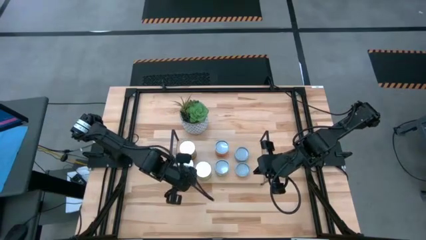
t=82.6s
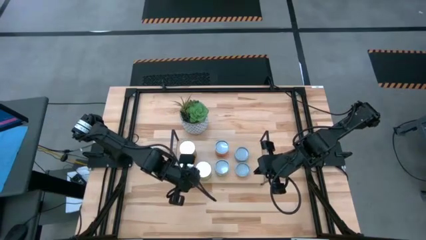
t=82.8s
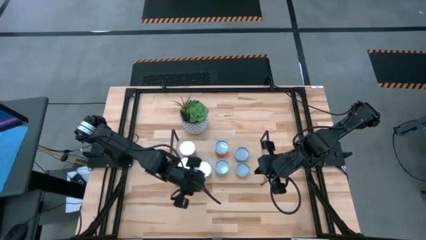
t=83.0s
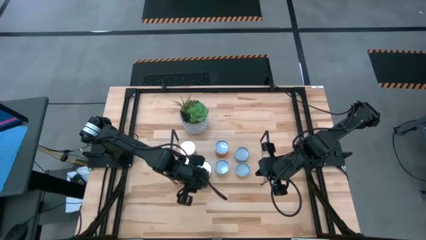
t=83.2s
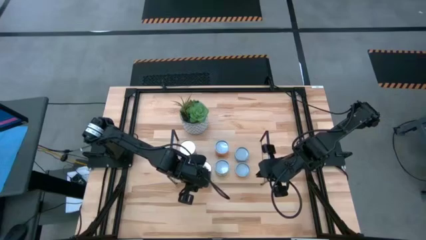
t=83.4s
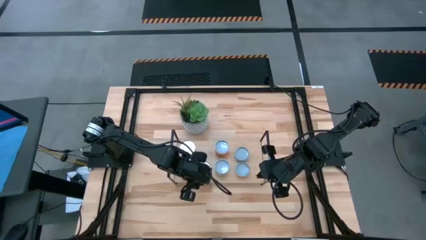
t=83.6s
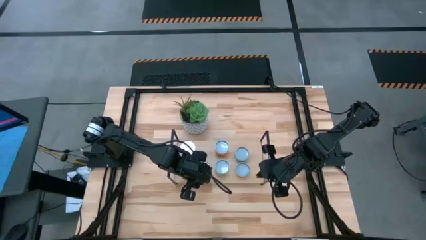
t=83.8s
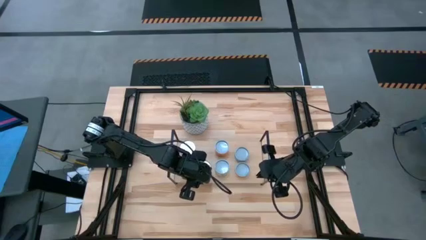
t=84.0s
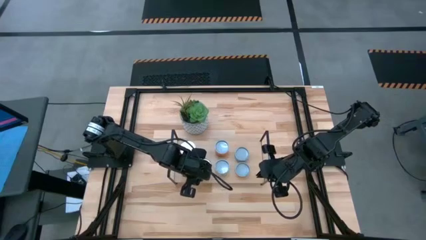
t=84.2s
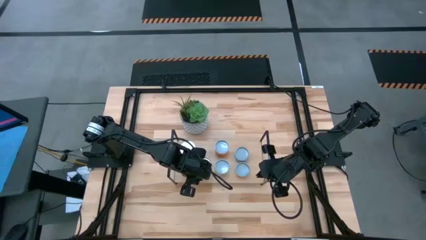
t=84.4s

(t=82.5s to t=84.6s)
Task: Pick and place cans onto a shelf
Adjust the canned pears on the shelf

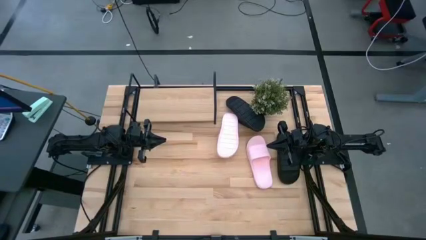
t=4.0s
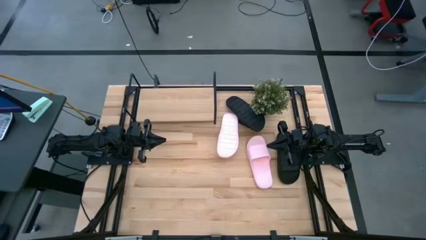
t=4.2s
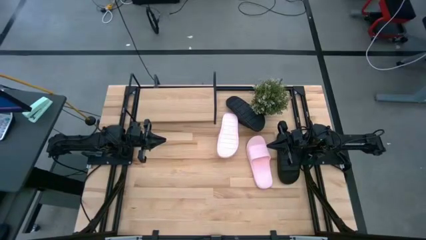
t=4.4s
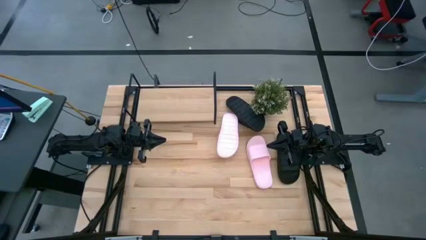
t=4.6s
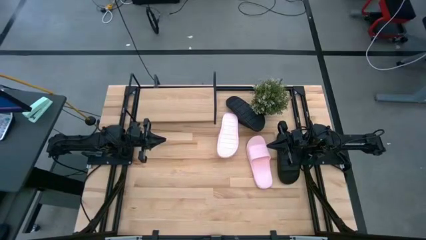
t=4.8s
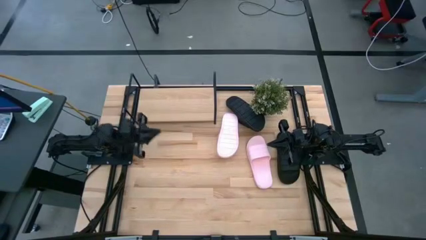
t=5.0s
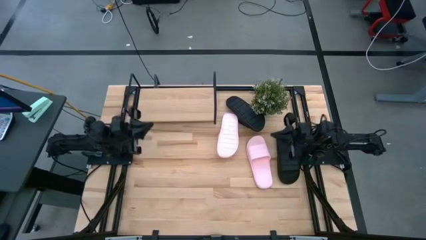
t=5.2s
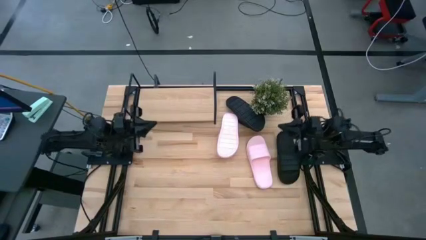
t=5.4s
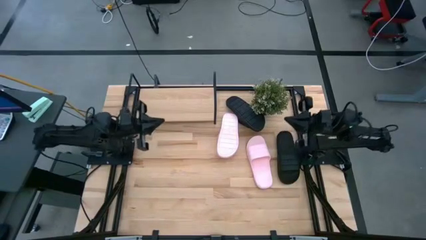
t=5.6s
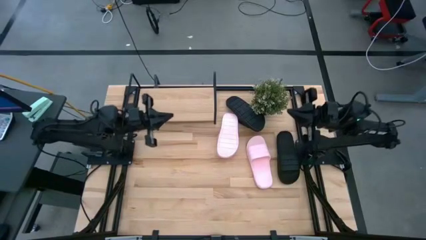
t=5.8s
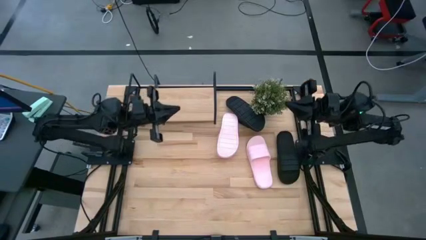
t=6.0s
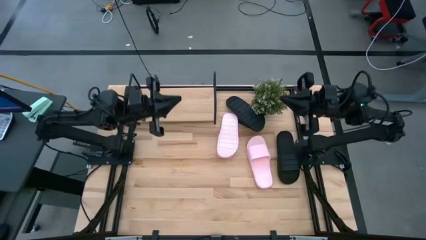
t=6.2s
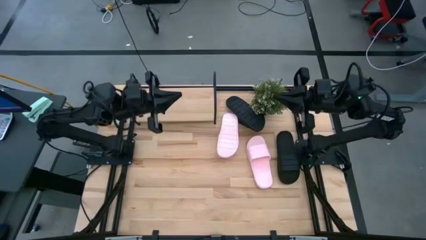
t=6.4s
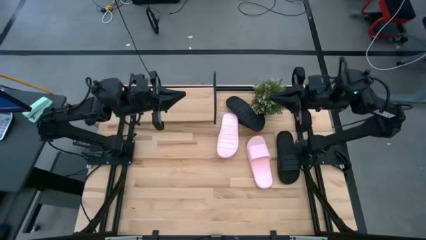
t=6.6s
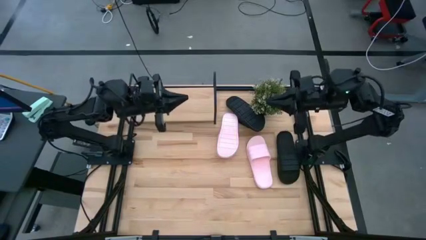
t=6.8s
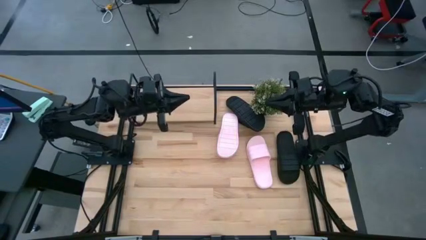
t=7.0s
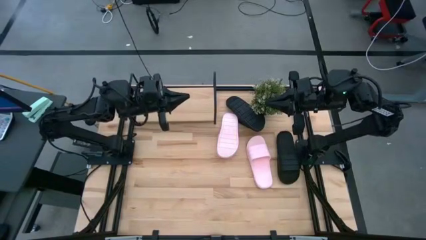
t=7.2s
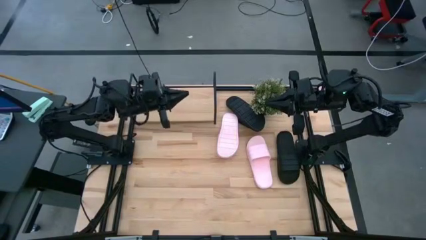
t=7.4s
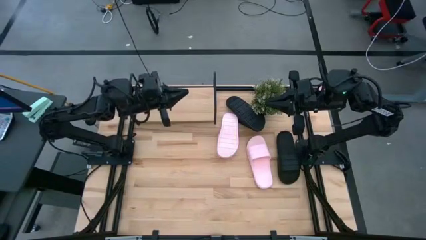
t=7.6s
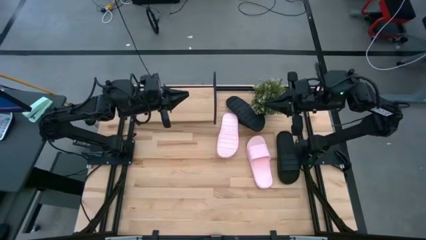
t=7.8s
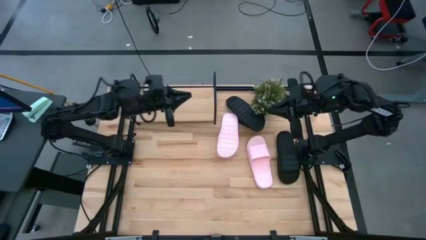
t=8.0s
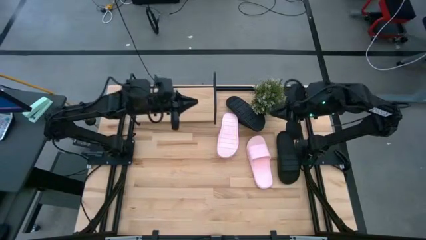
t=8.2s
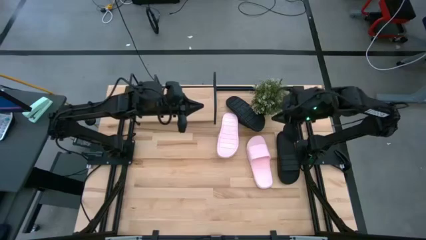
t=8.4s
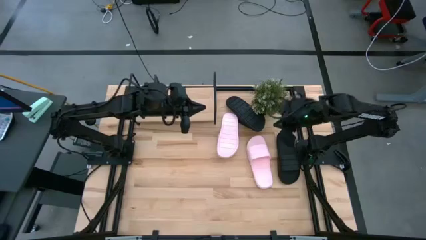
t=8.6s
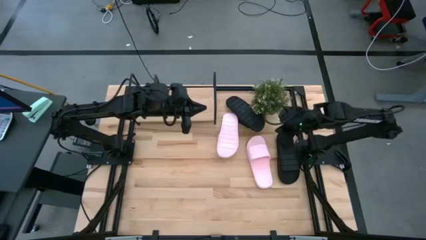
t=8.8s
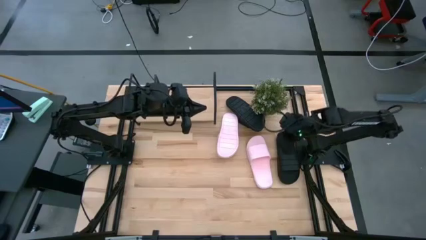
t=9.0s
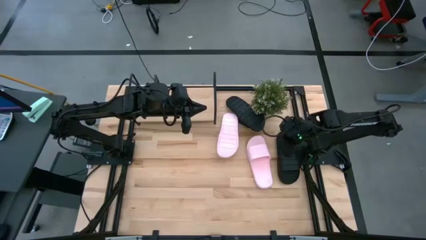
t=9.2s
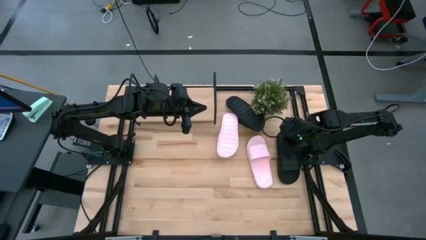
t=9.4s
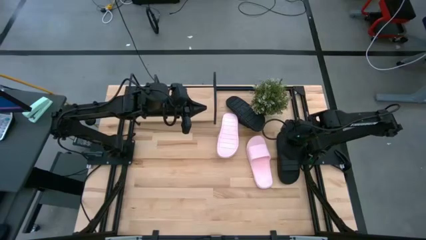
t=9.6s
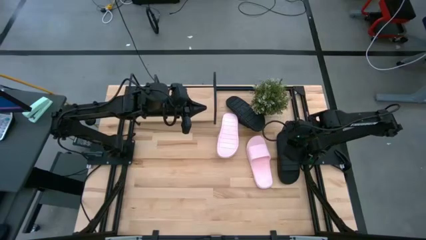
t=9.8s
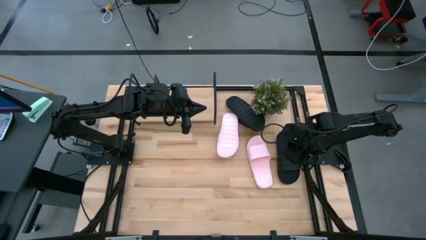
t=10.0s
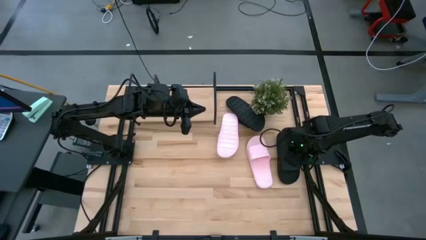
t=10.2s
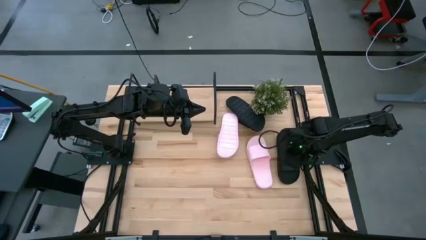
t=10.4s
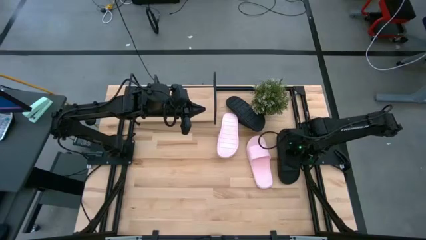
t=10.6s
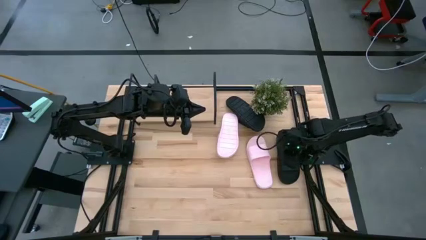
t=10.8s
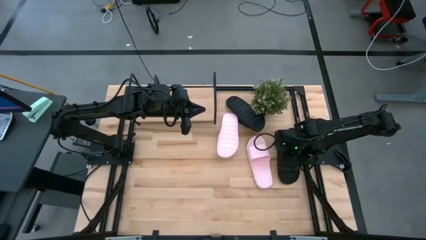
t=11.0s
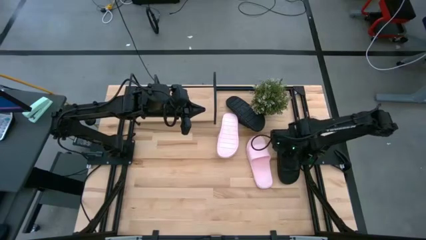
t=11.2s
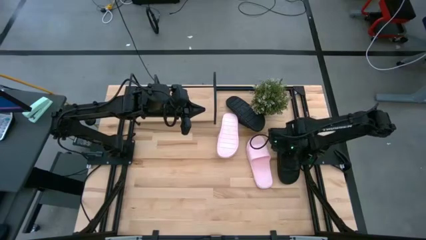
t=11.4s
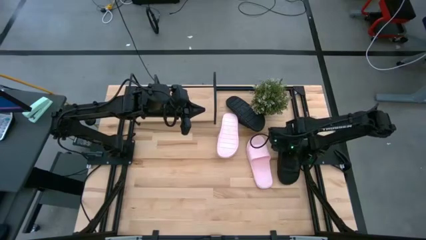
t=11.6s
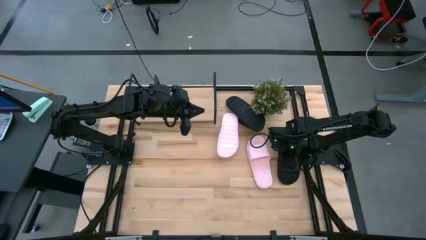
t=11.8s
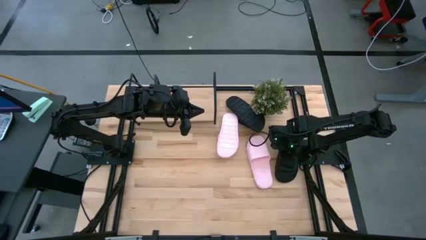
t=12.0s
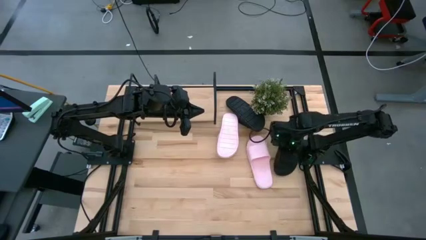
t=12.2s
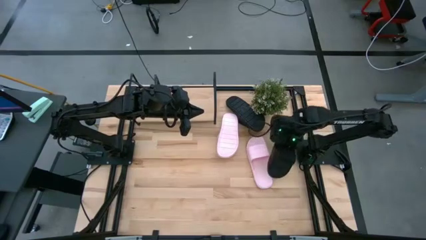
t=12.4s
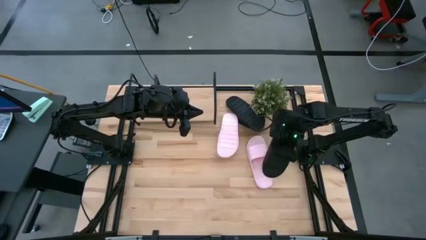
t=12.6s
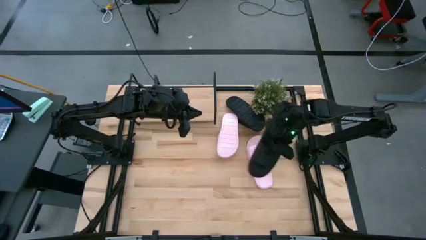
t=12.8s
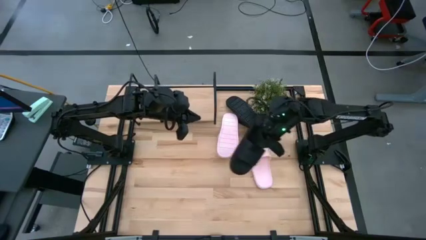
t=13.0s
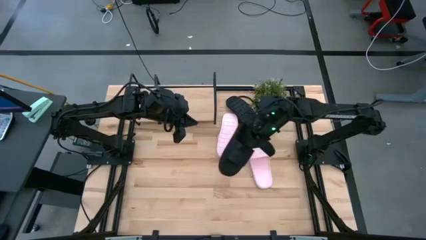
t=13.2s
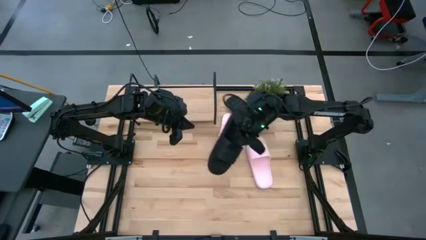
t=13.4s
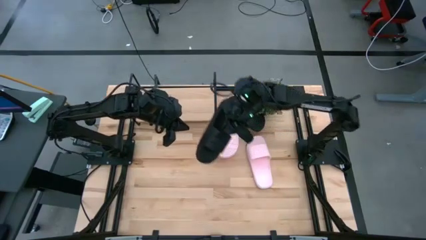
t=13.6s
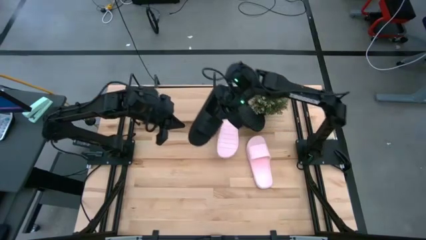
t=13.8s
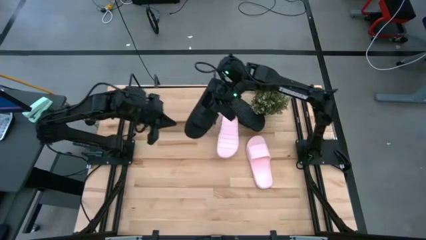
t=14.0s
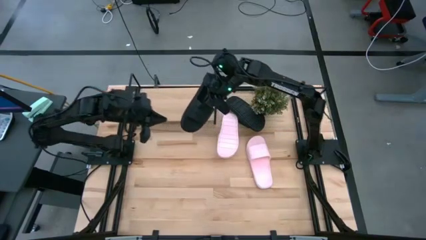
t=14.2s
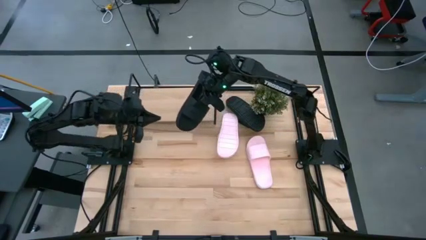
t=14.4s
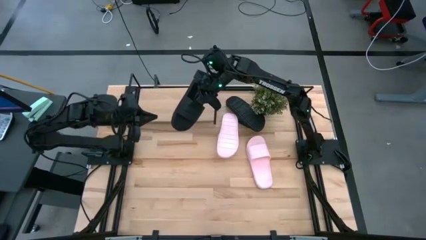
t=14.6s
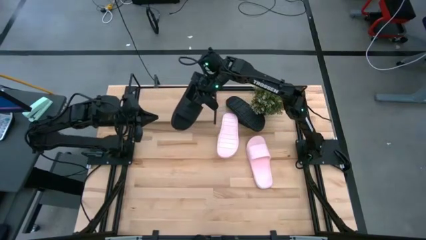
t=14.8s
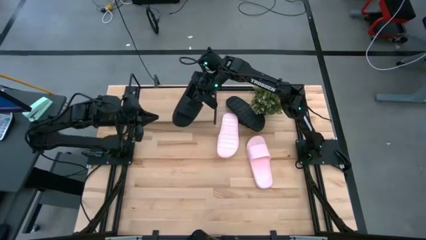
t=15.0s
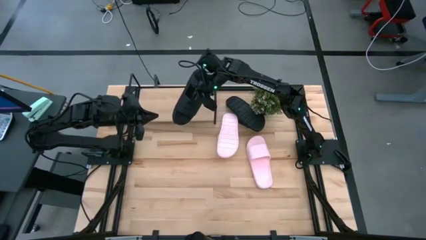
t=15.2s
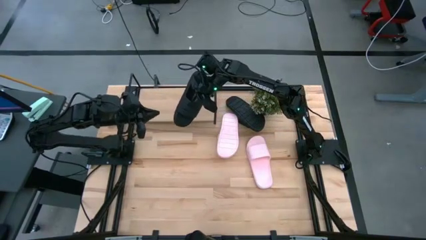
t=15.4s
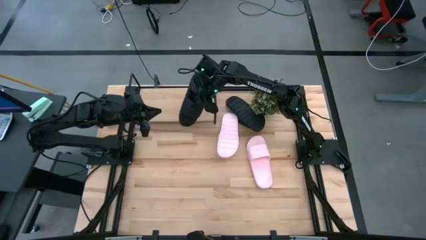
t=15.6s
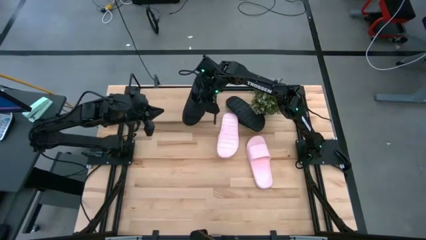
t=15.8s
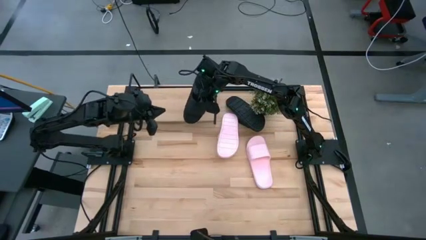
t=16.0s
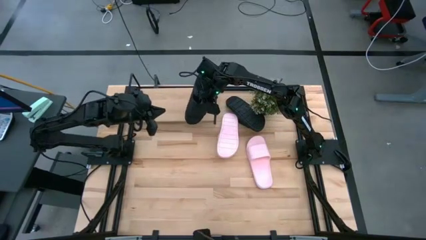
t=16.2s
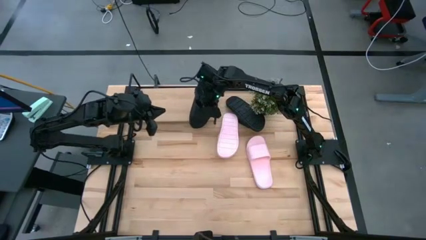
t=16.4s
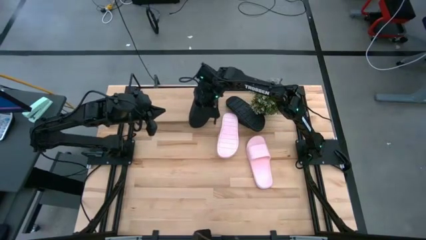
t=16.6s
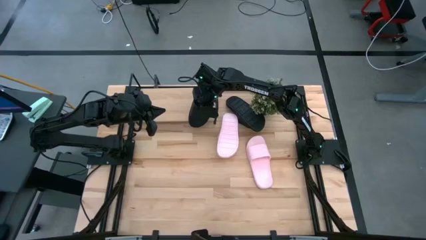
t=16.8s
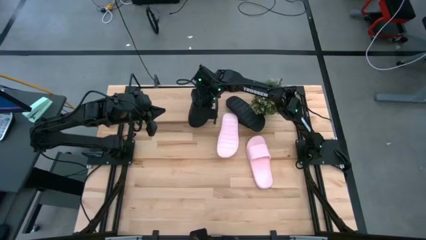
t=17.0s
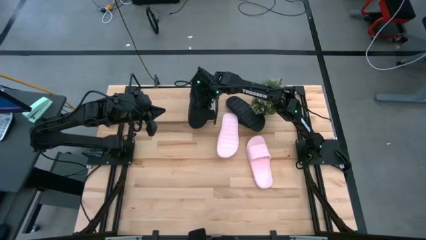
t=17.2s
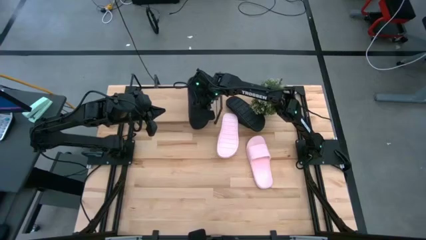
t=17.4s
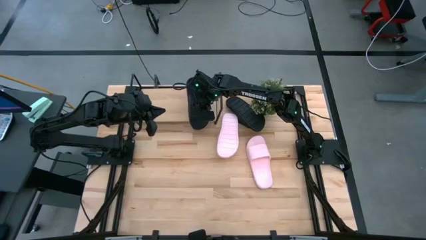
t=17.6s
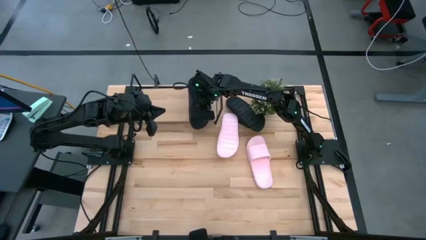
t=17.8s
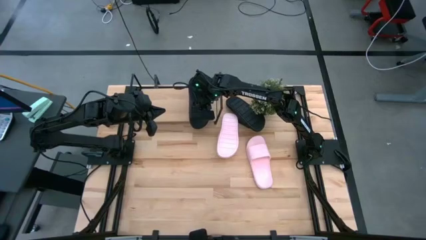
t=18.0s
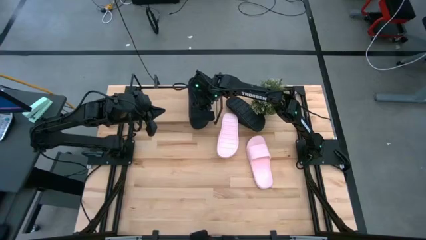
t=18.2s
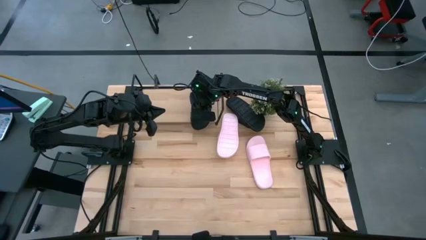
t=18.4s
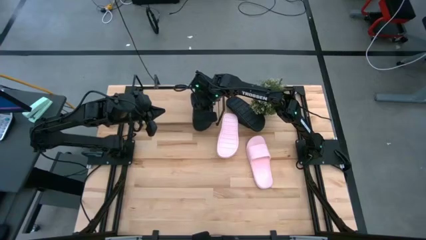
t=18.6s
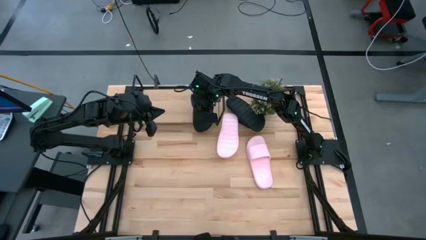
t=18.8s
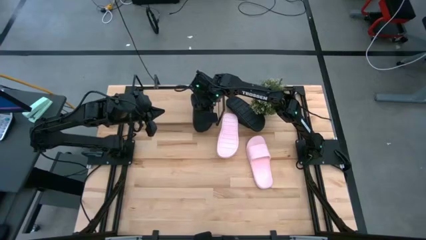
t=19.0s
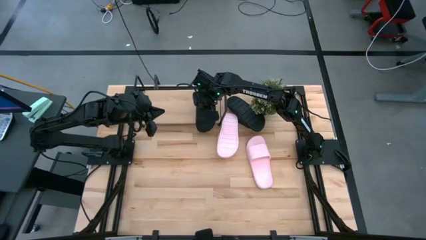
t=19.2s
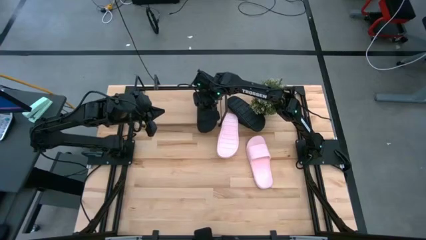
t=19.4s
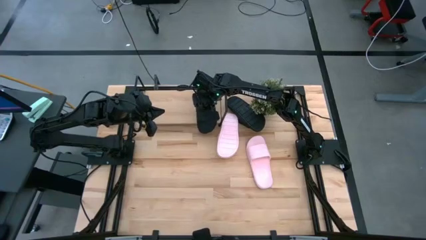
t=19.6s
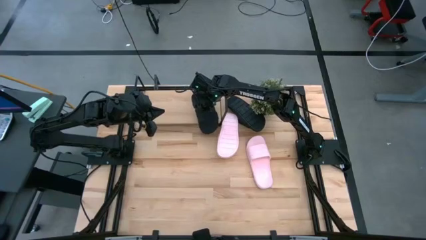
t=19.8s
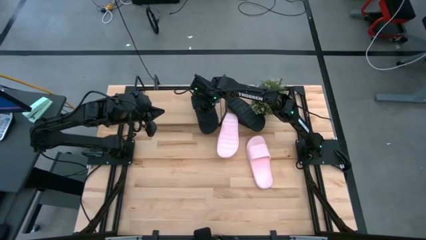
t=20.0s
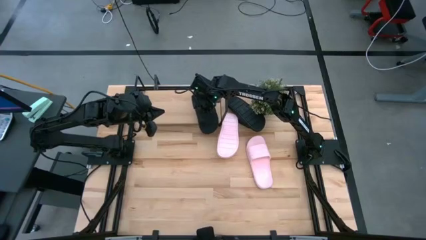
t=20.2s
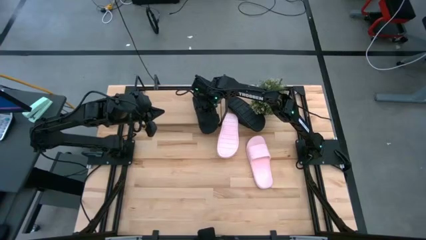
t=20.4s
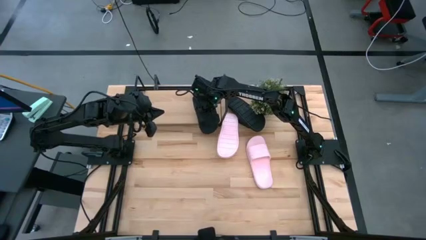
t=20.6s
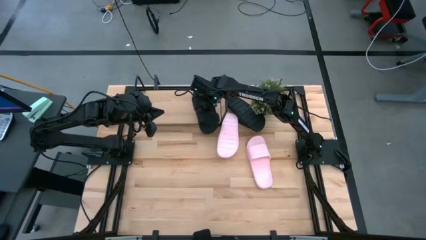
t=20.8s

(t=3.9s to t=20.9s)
Task: Pick and place slides into the shelf
Put the bottom black slipper onto the shelf
